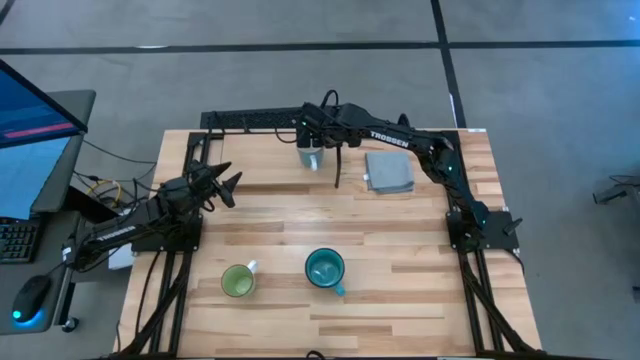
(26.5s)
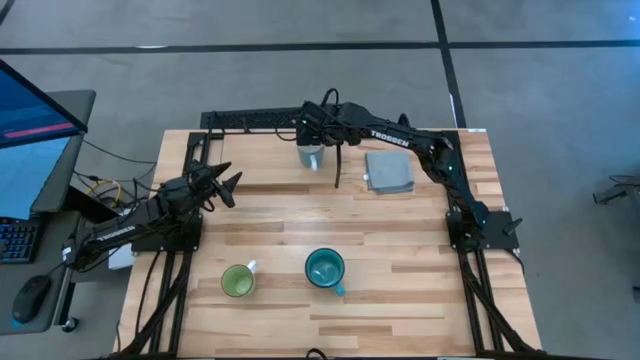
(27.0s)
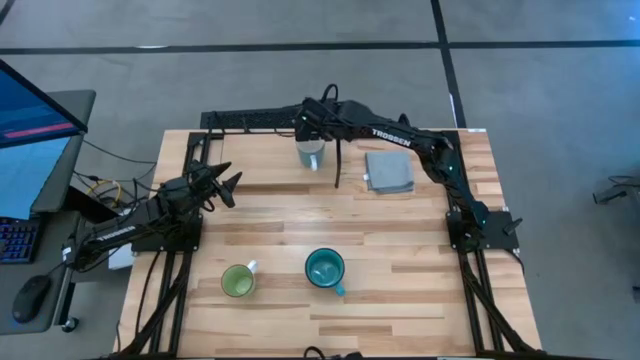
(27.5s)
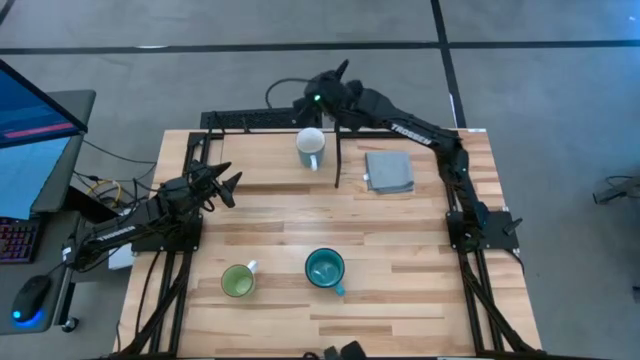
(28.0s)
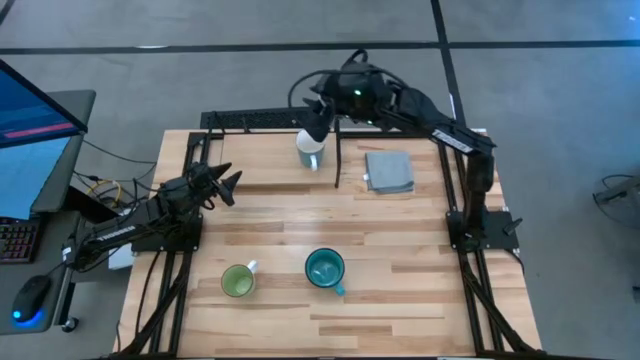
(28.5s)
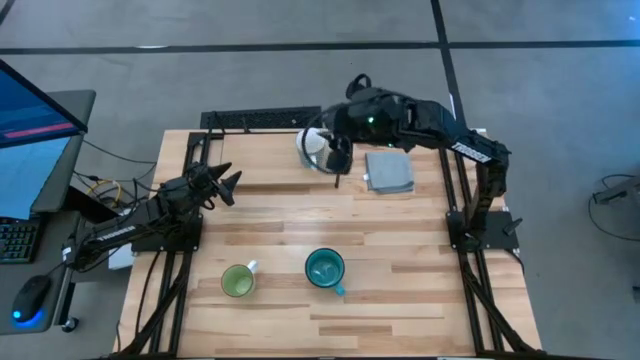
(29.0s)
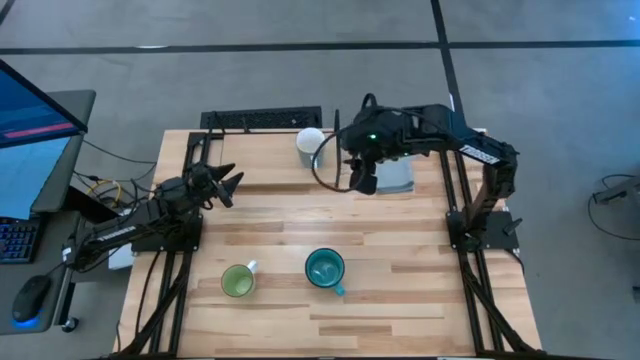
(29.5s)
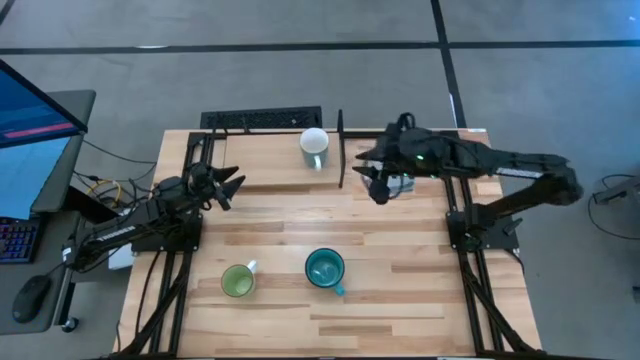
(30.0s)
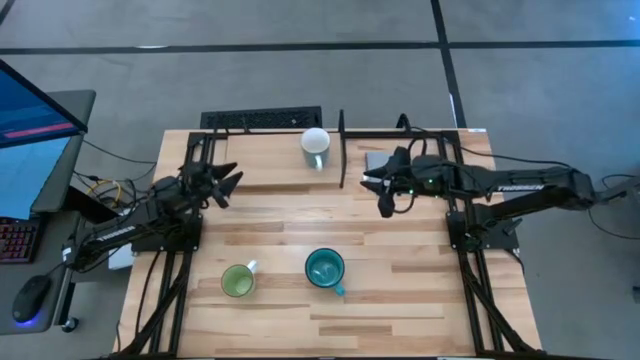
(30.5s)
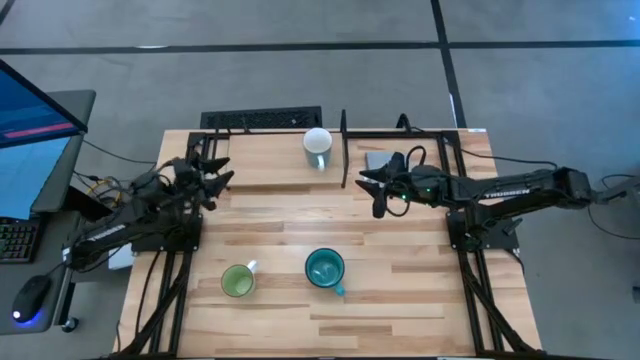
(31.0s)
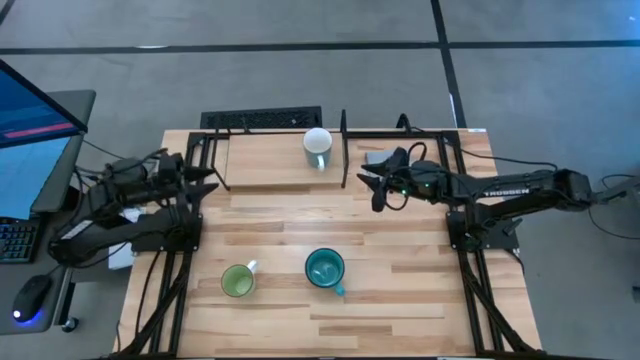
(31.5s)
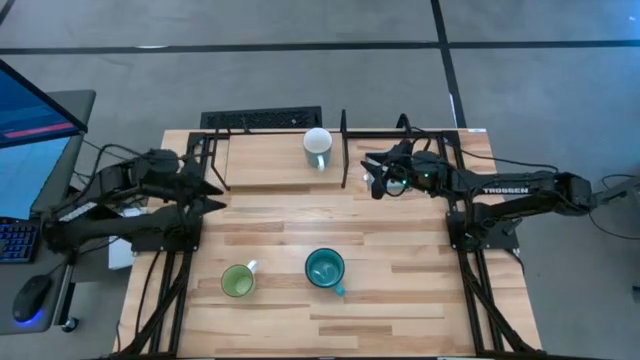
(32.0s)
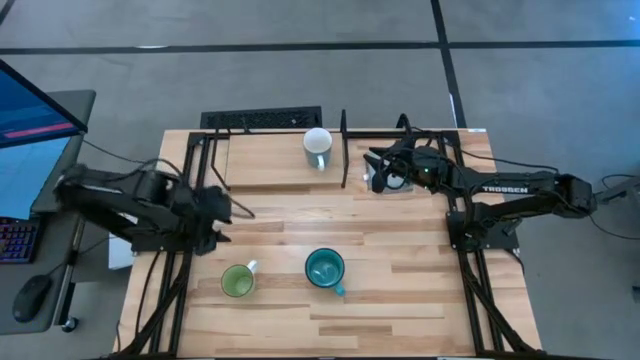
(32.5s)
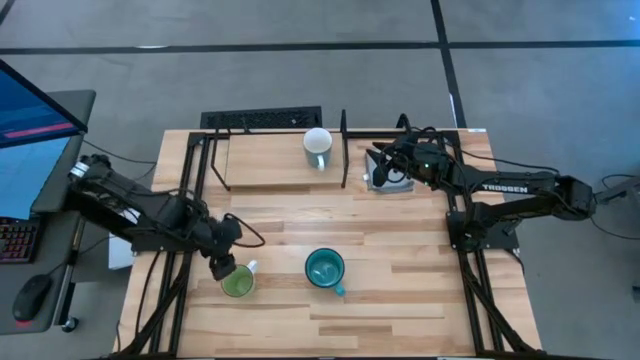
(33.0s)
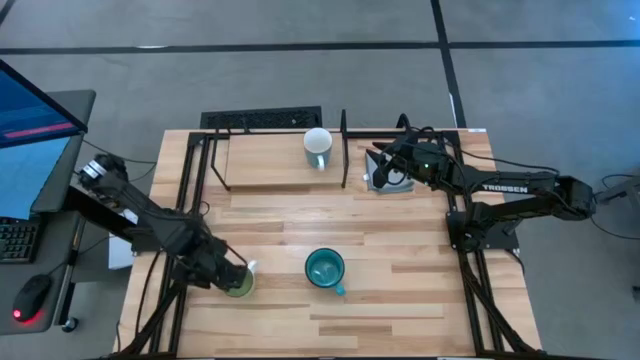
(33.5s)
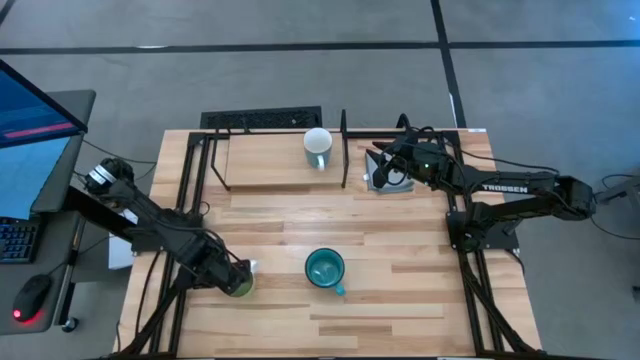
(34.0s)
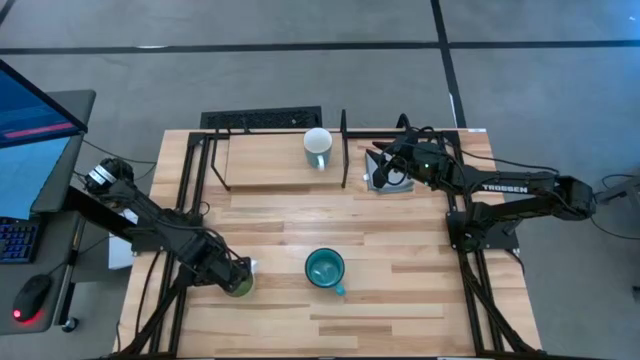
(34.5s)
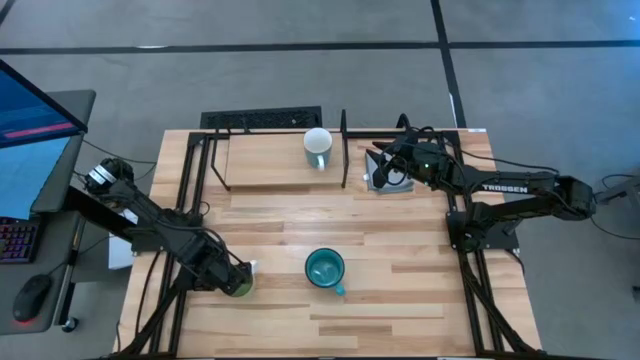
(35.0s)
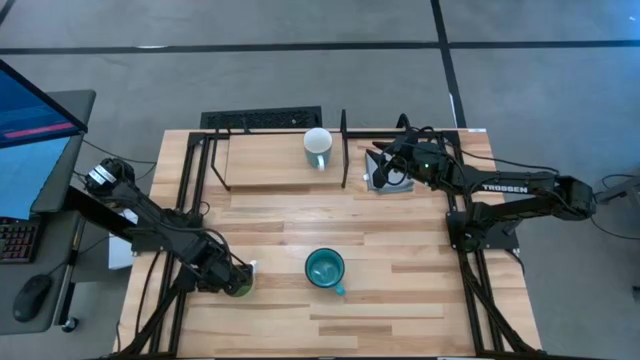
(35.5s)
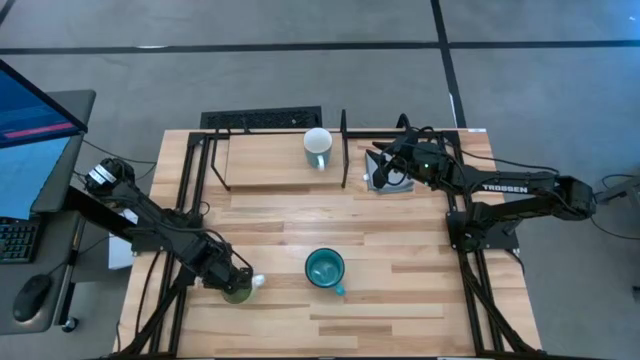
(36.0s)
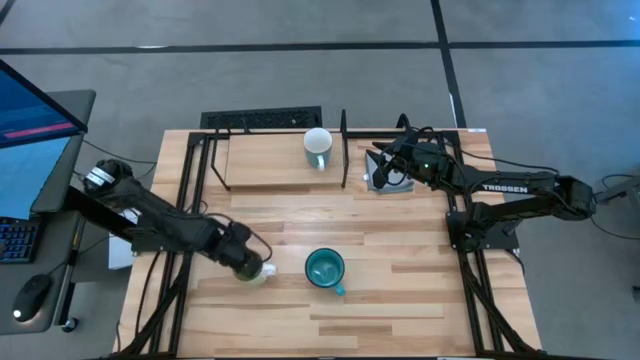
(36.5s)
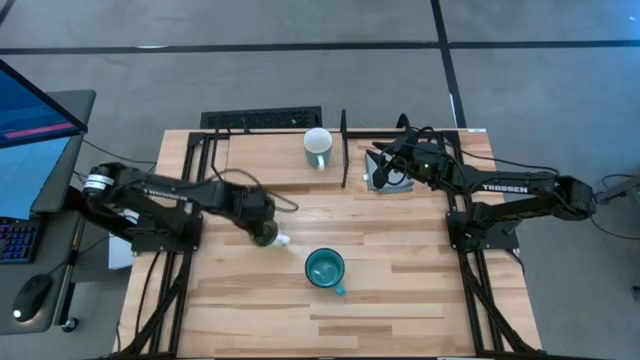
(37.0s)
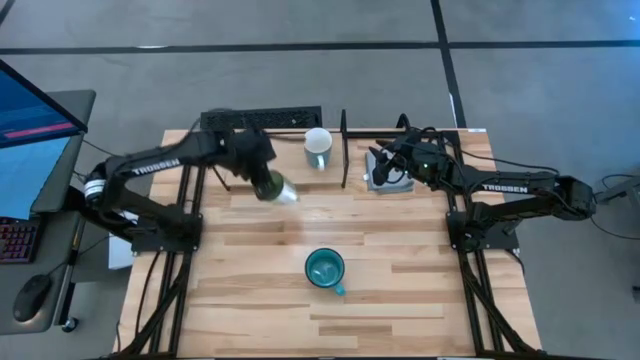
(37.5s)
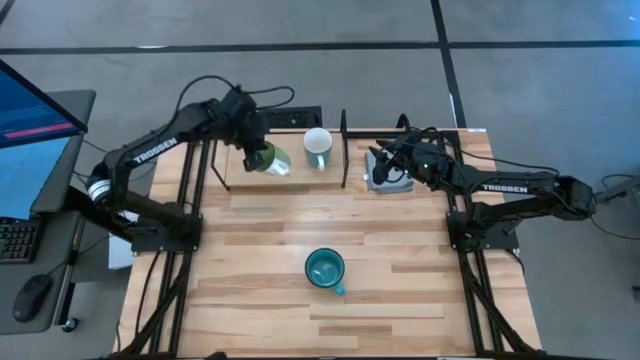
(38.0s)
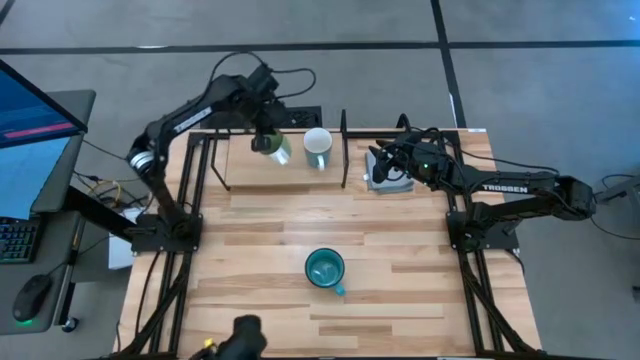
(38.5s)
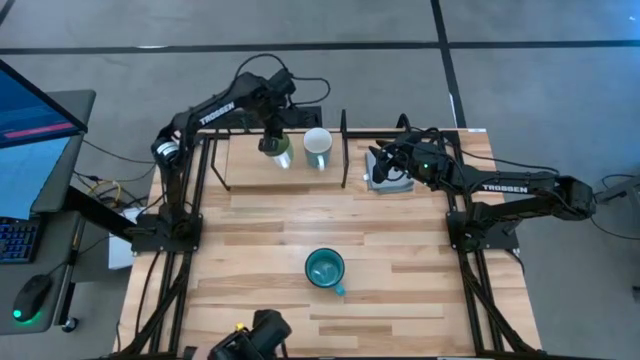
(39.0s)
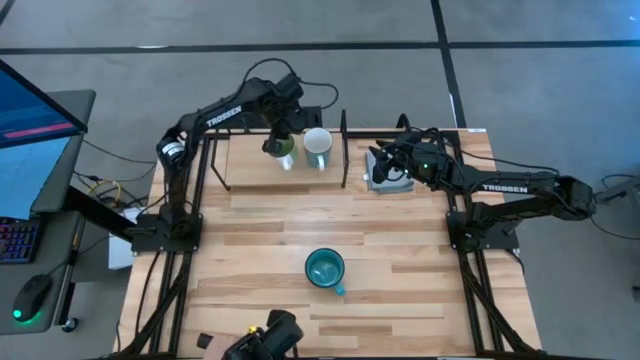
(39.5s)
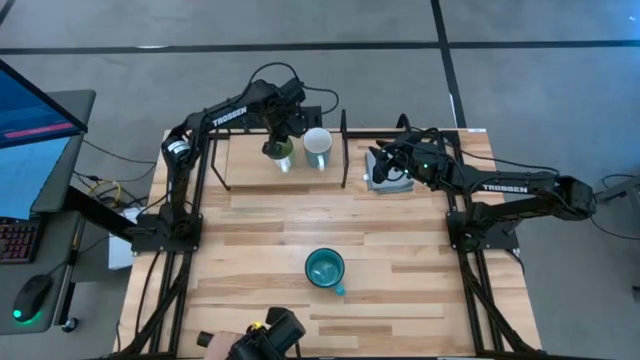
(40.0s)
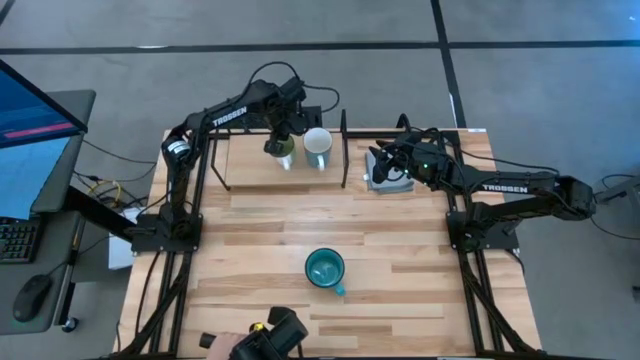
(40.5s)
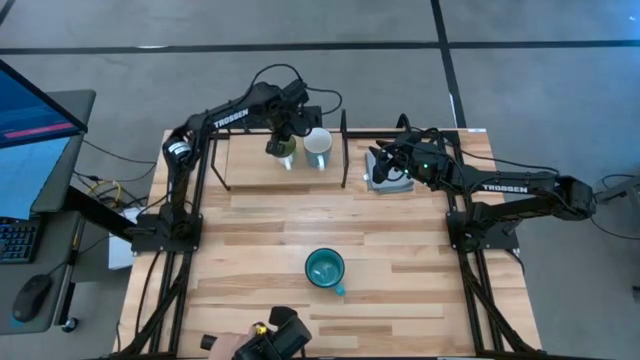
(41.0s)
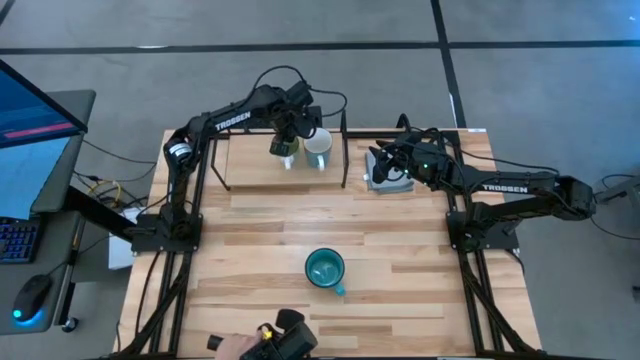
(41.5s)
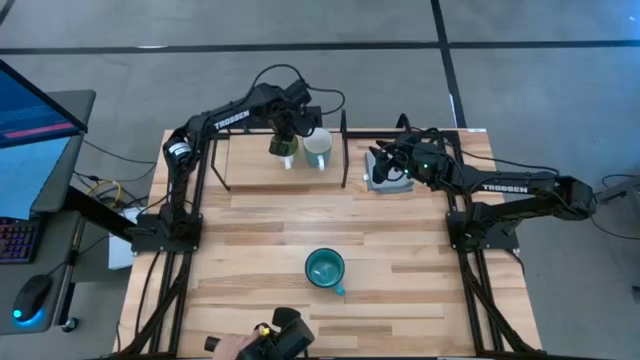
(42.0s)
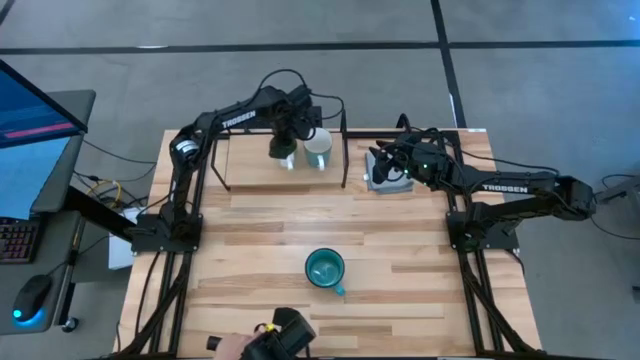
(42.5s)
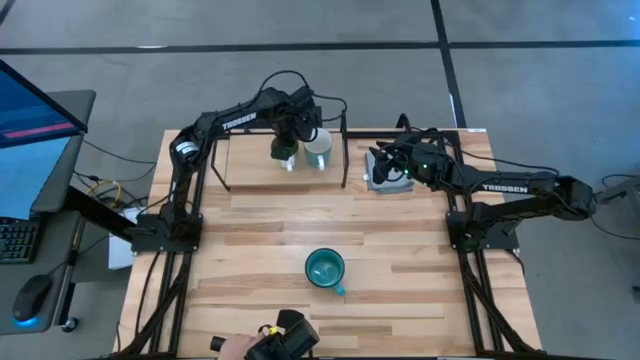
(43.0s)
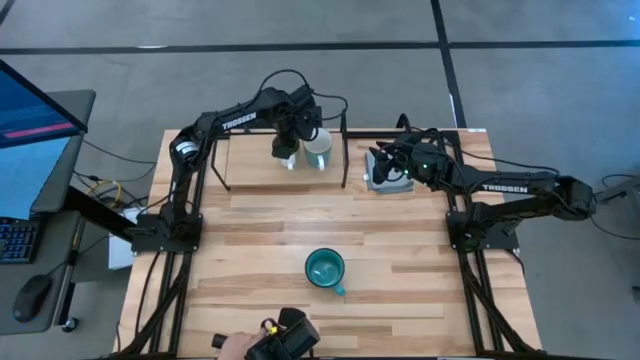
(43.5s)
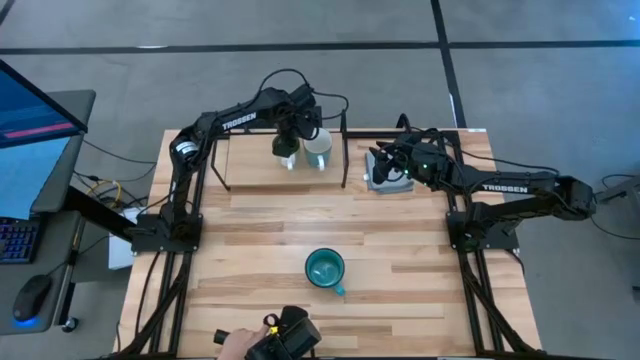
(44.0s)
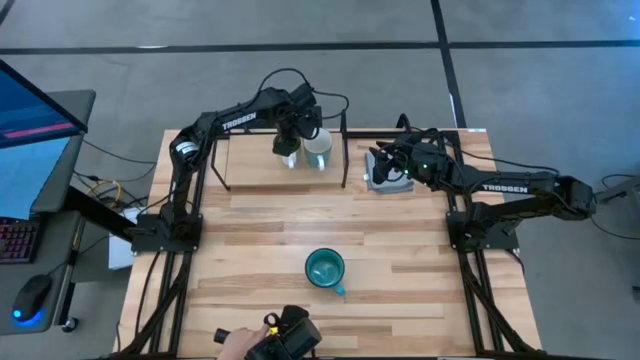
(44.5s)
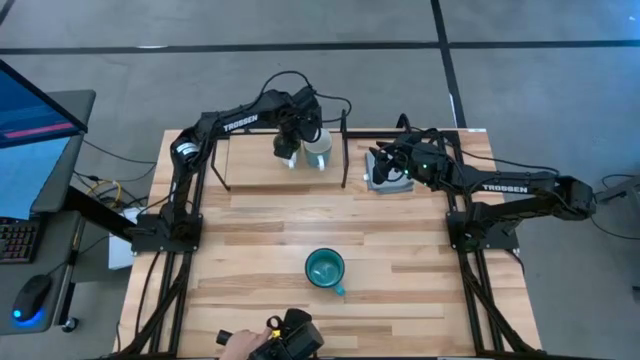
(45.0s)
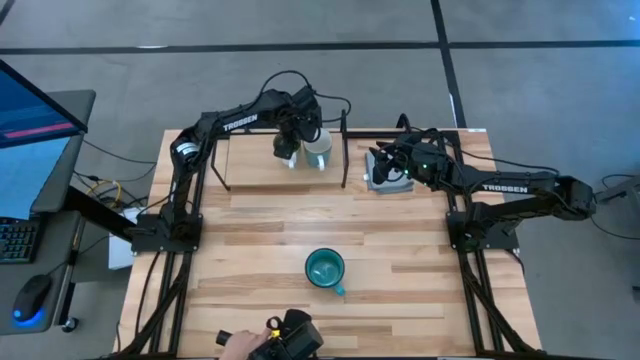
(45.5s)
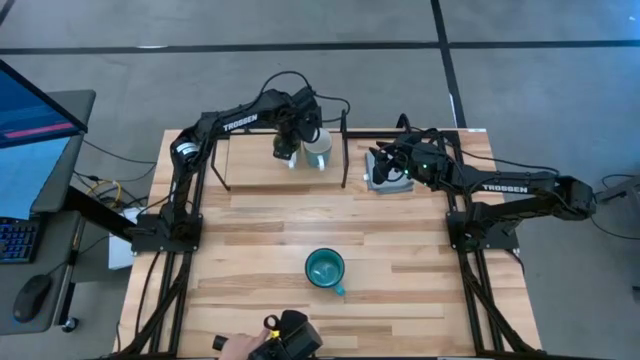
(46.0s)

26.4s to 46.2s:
Task: Stack small to large cups/mugs on shelf
Put the green mug on the shelf
